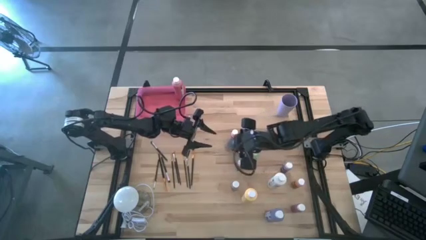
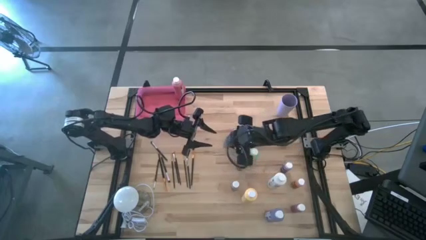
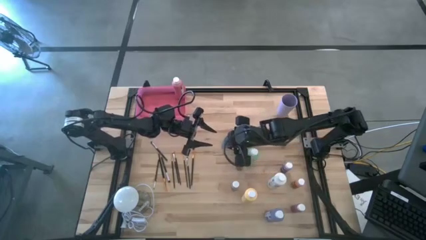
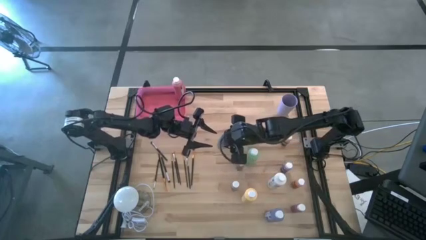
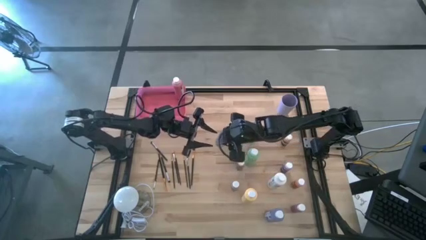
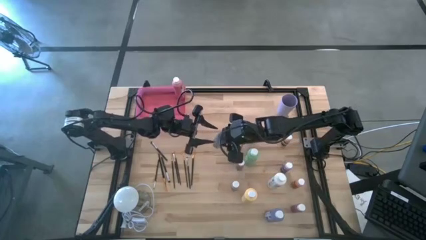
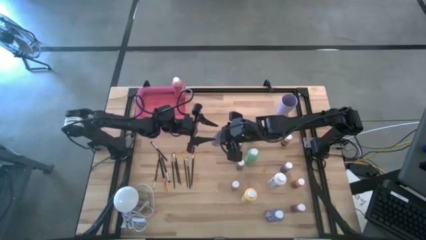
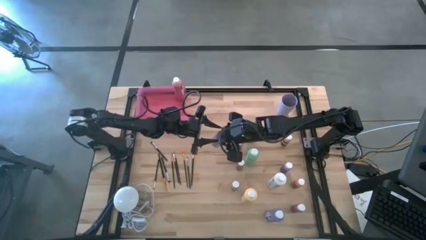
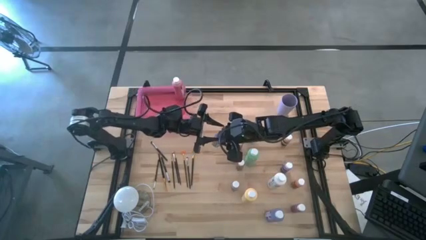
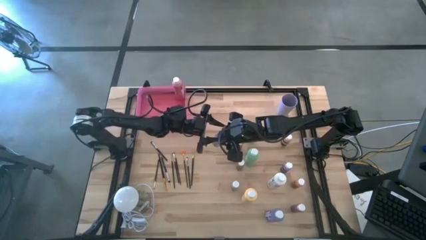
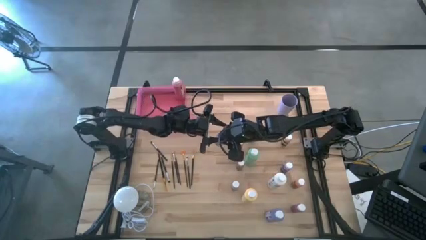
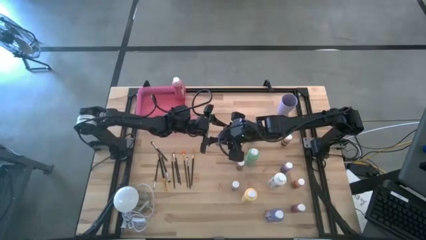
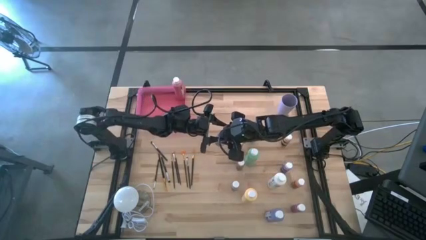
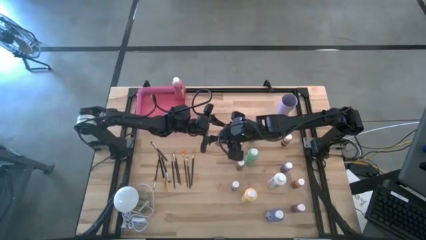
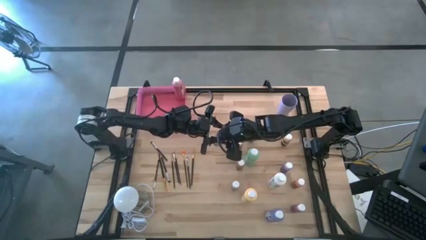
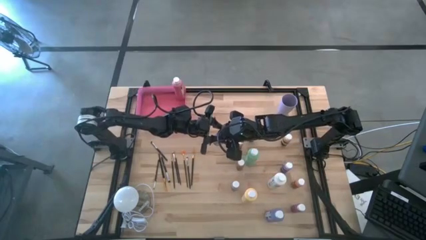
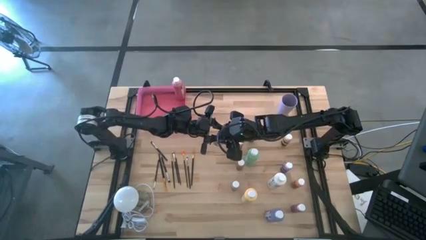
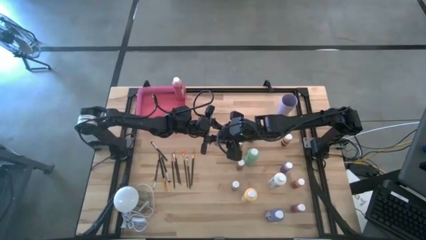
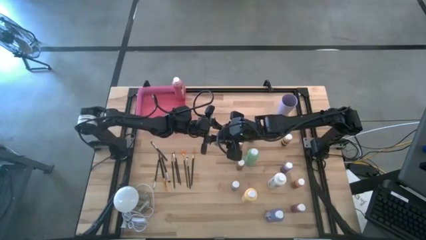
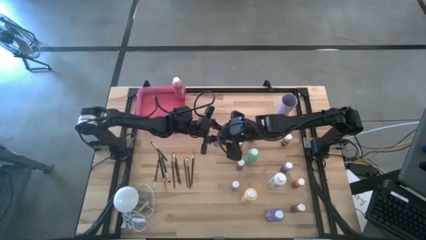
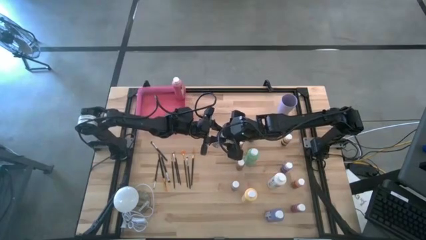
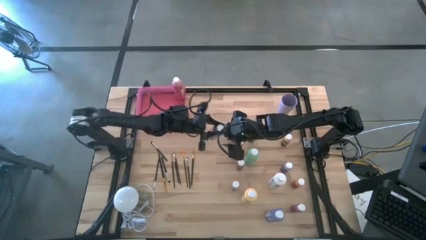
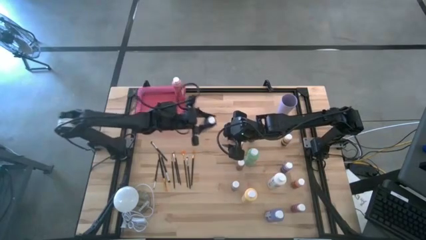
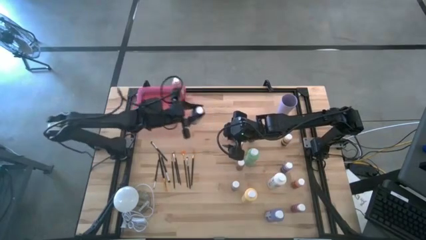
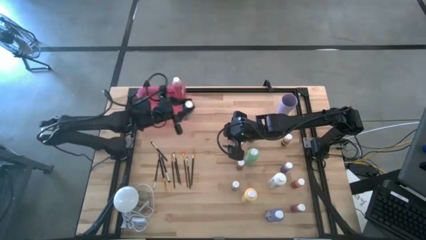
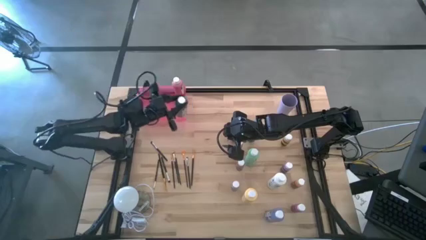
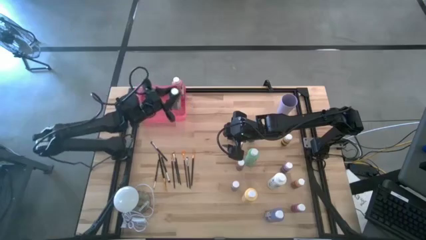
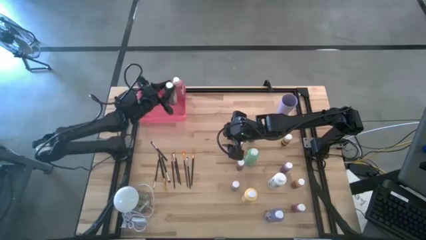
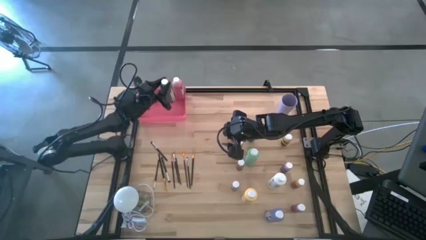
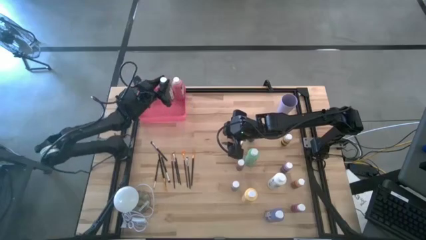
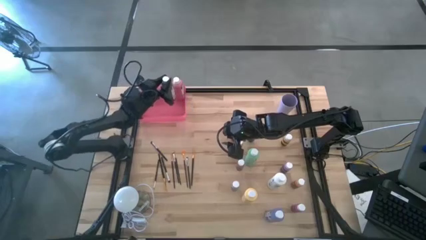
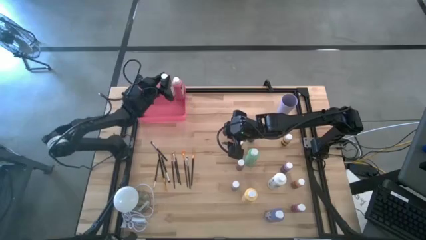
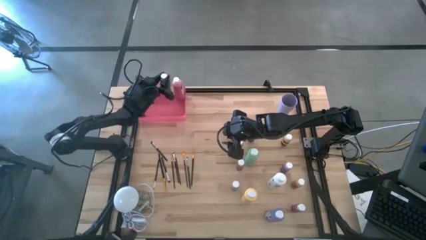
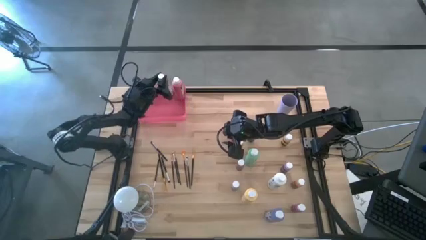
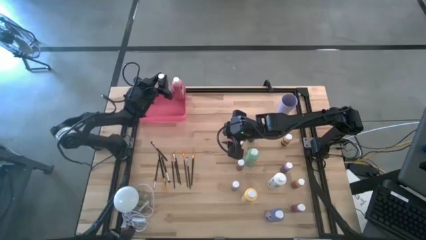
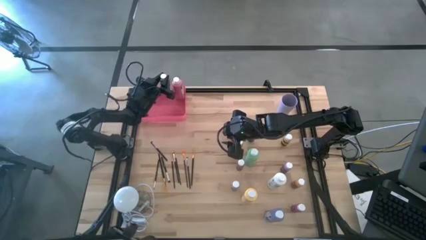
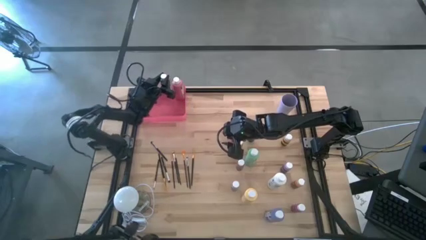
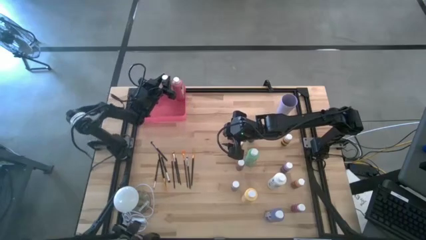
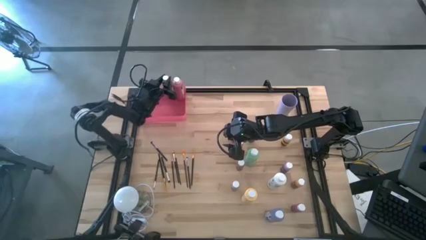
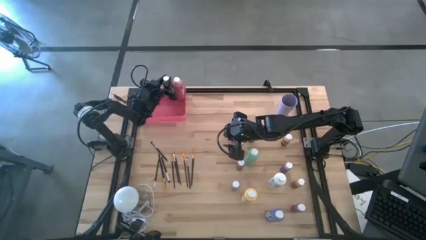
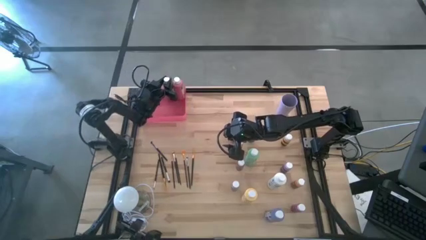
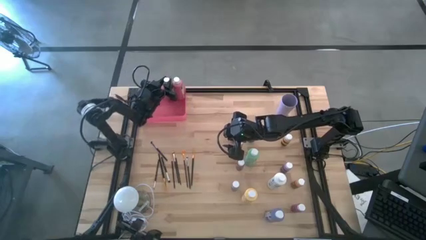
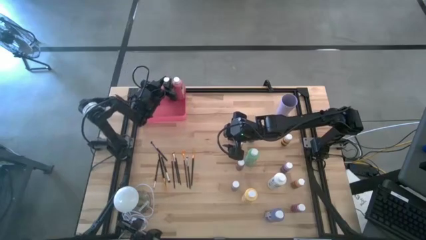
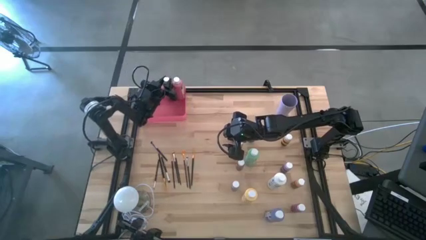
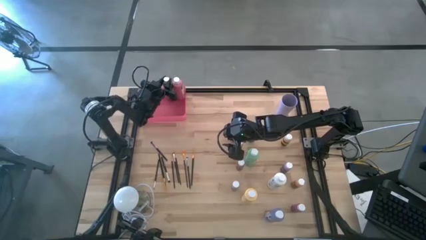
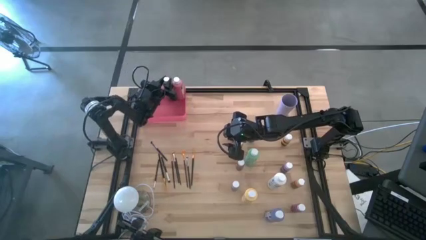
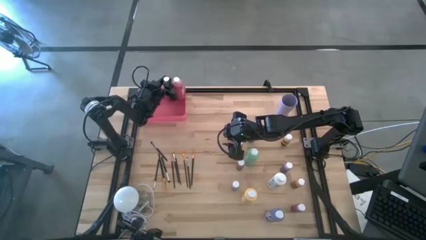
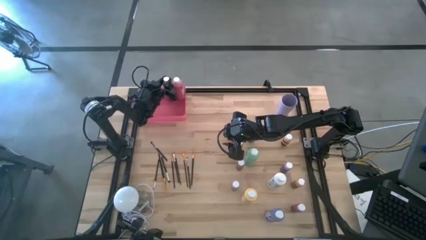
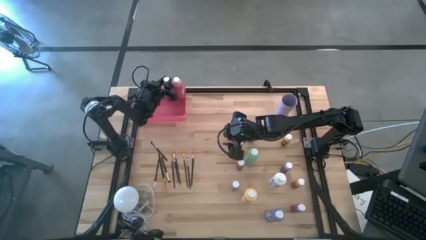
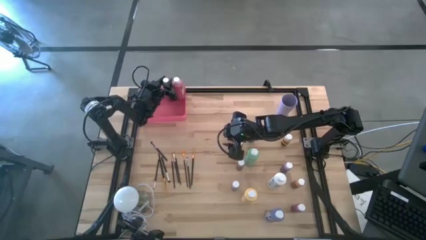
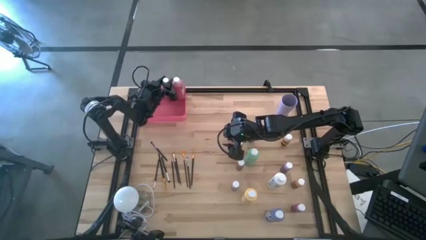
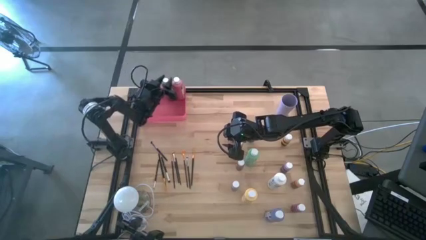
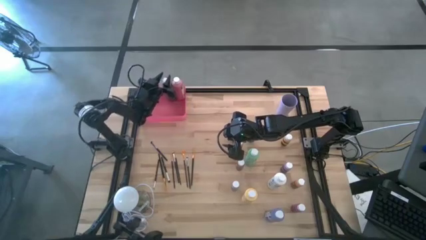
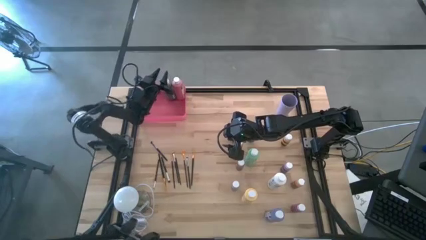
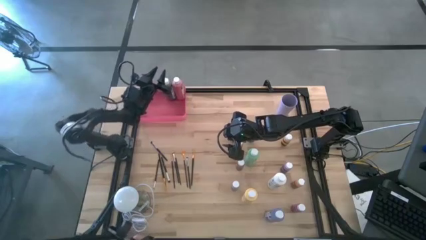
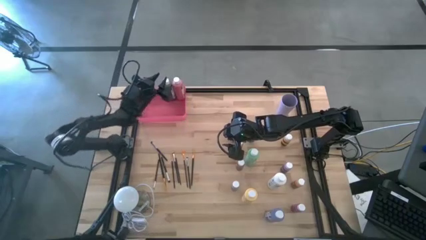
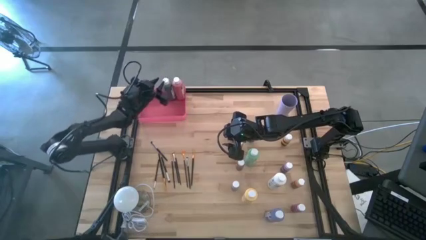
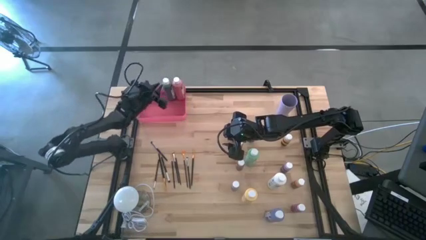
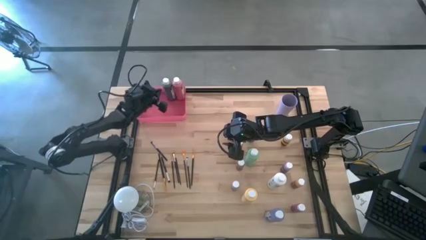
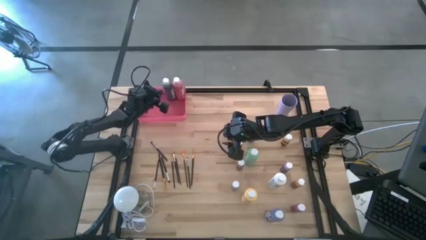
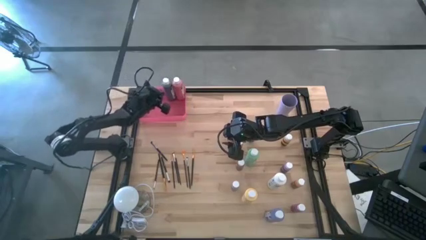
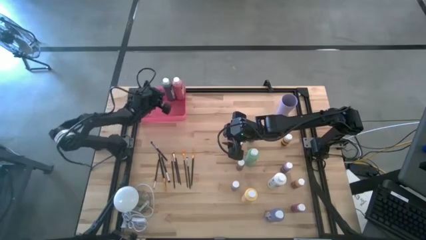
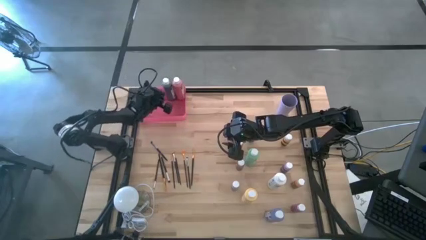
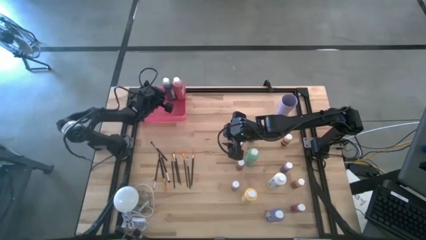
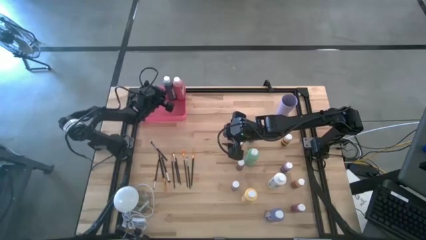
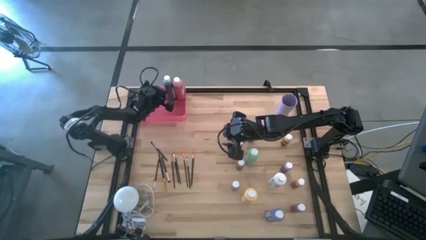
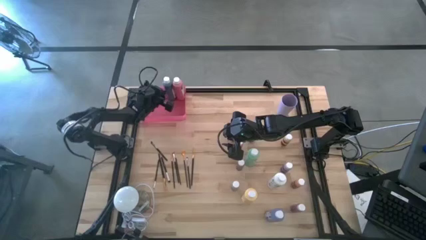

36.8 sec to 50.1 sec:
Task: Pick & Place Paint Supplies
Put the large black paint bottle into the pink bin
